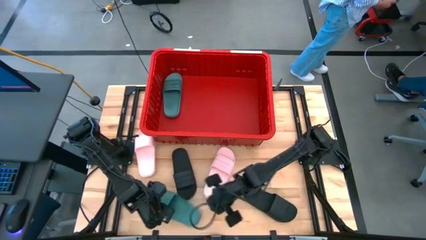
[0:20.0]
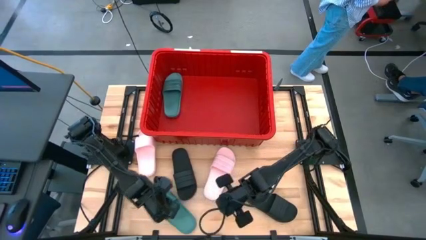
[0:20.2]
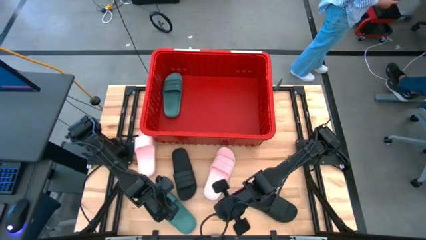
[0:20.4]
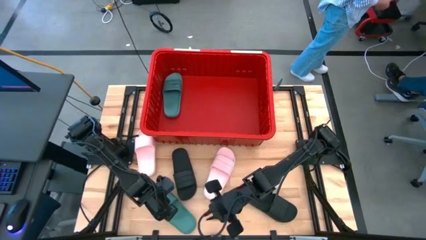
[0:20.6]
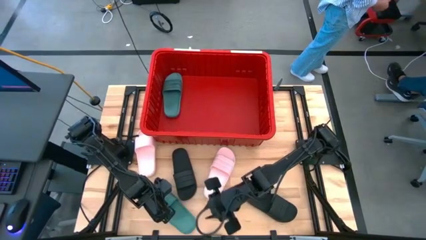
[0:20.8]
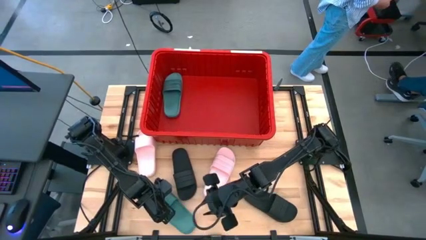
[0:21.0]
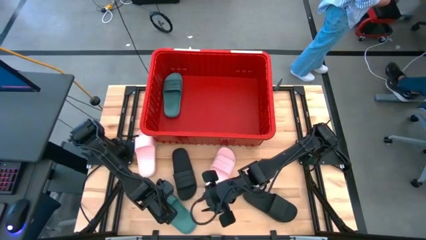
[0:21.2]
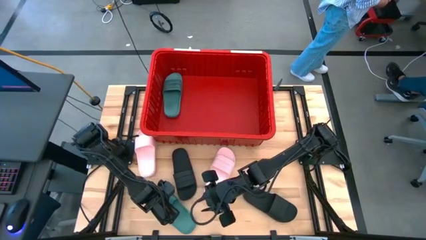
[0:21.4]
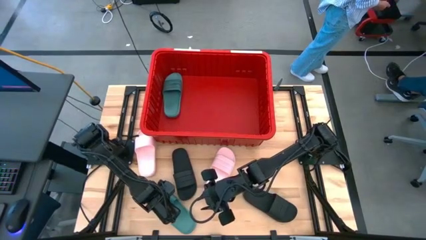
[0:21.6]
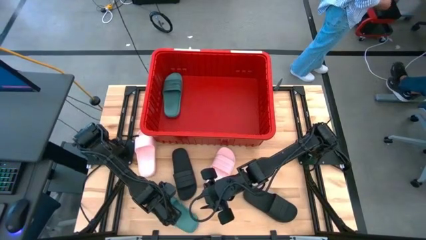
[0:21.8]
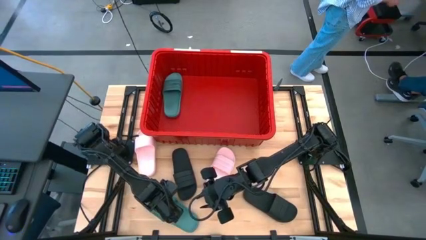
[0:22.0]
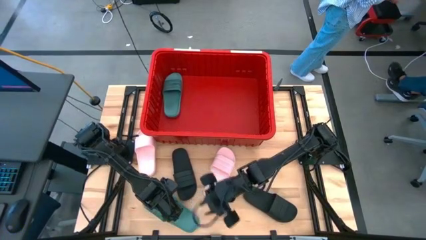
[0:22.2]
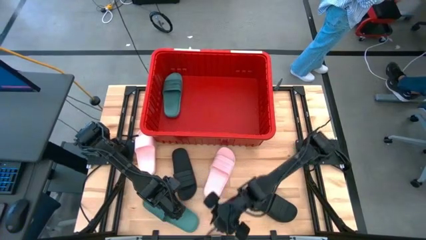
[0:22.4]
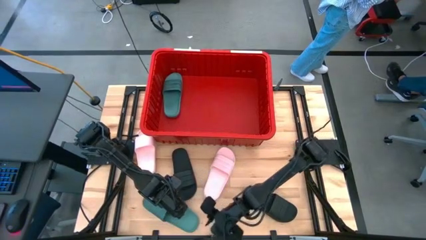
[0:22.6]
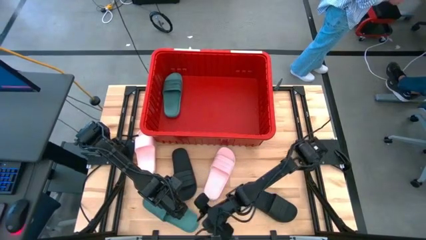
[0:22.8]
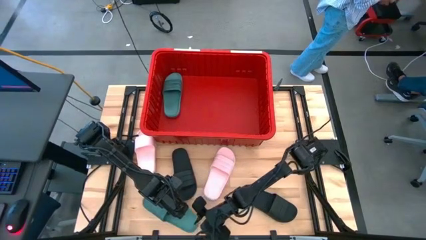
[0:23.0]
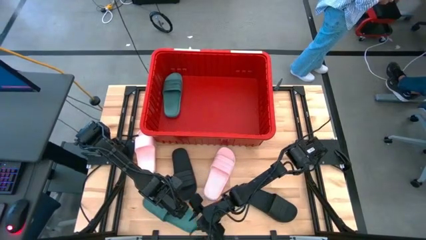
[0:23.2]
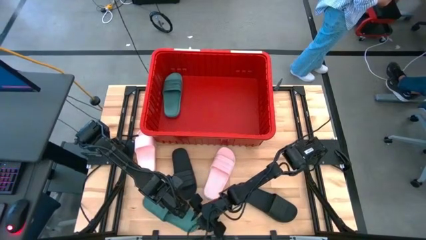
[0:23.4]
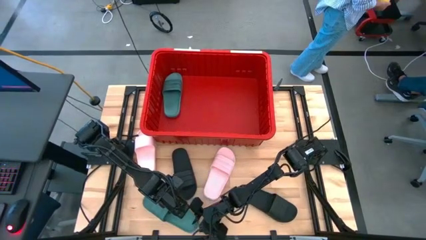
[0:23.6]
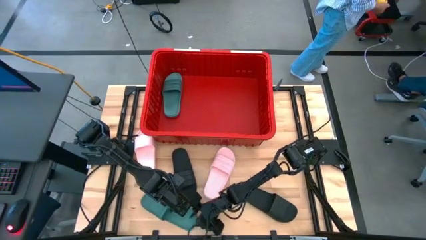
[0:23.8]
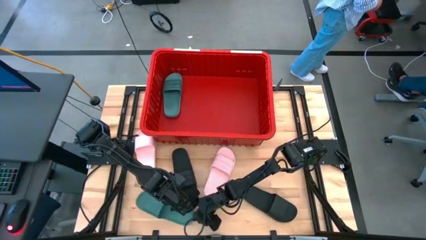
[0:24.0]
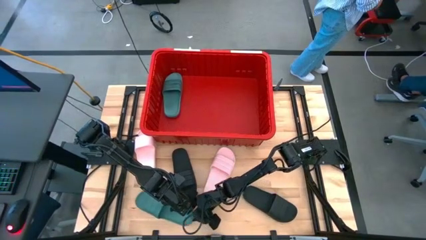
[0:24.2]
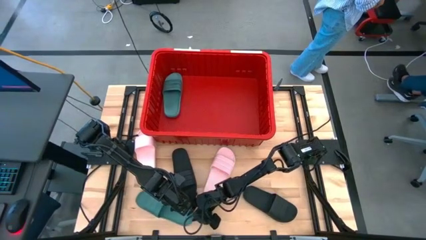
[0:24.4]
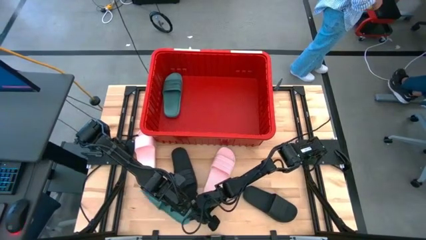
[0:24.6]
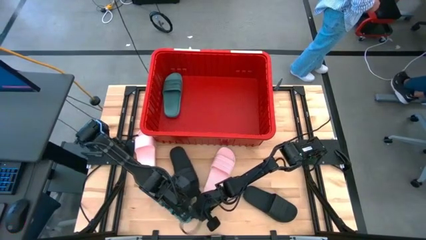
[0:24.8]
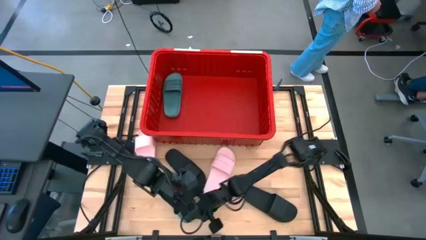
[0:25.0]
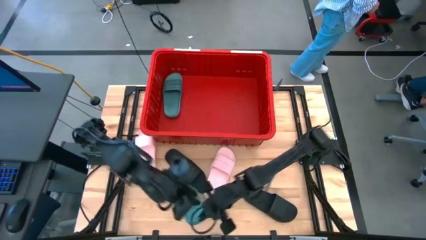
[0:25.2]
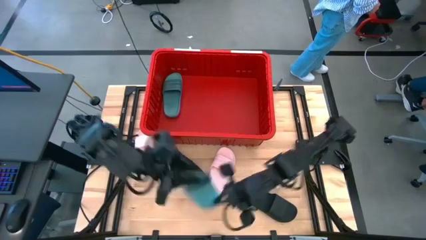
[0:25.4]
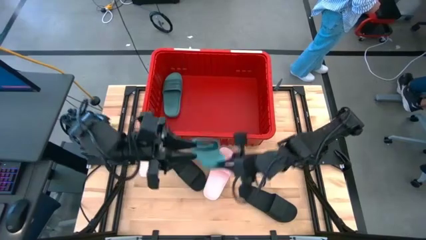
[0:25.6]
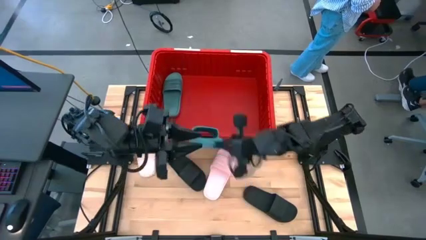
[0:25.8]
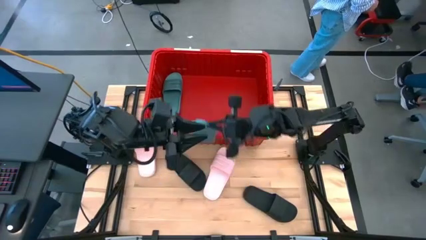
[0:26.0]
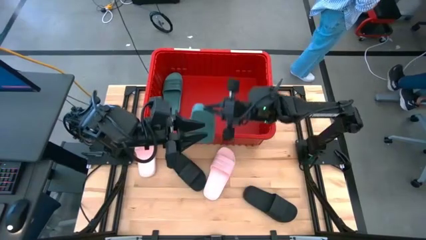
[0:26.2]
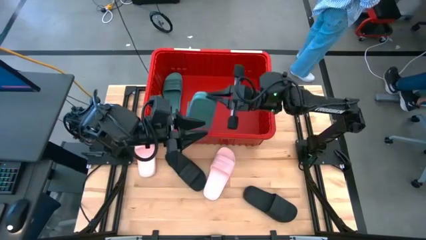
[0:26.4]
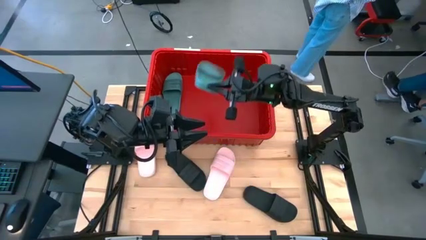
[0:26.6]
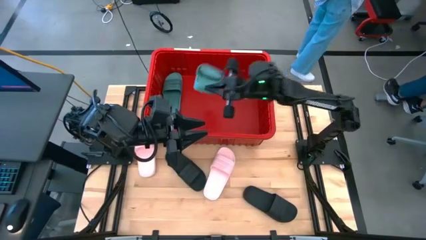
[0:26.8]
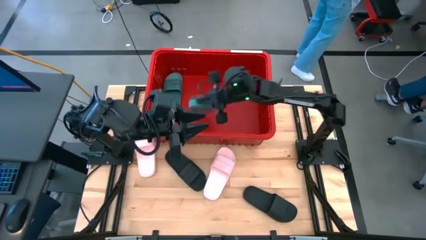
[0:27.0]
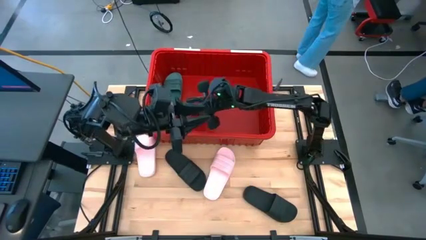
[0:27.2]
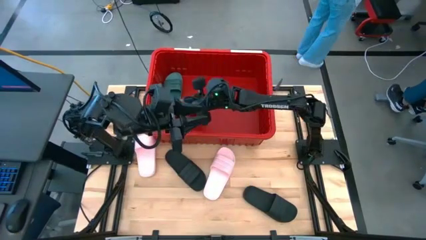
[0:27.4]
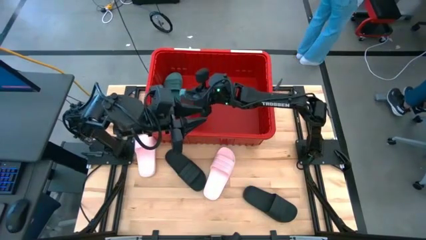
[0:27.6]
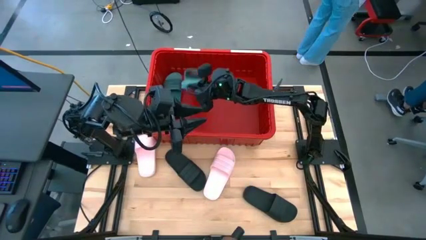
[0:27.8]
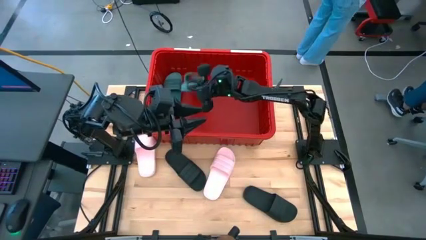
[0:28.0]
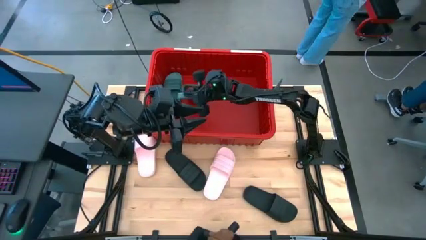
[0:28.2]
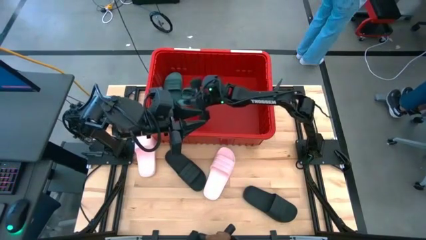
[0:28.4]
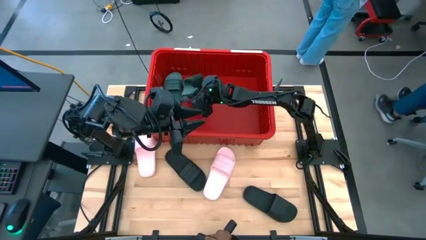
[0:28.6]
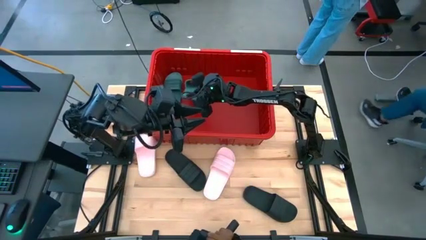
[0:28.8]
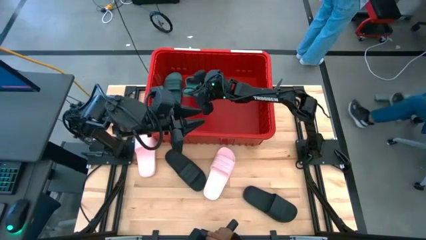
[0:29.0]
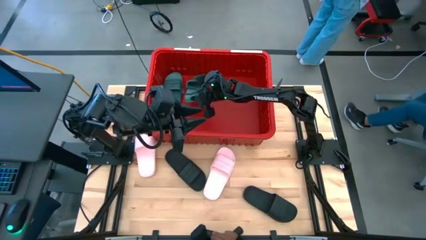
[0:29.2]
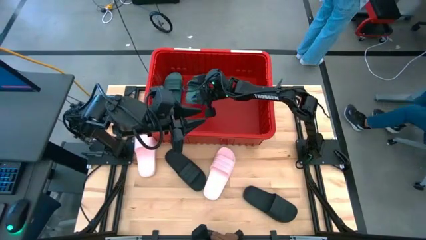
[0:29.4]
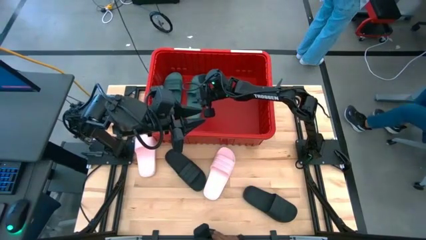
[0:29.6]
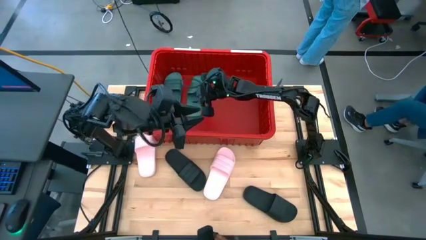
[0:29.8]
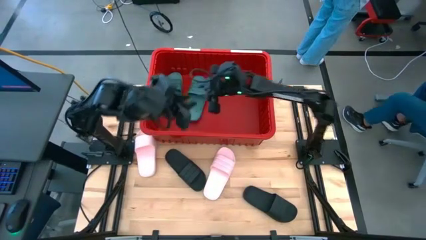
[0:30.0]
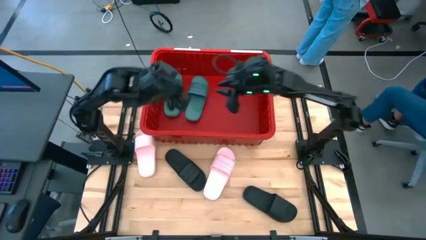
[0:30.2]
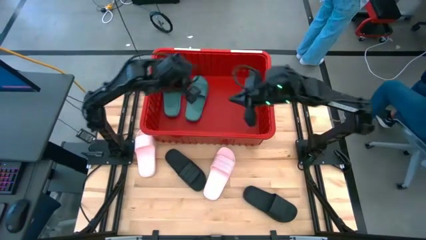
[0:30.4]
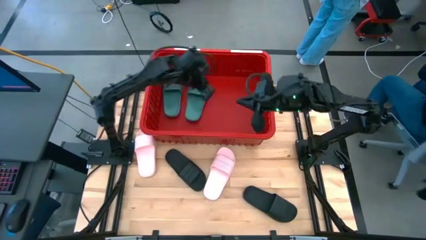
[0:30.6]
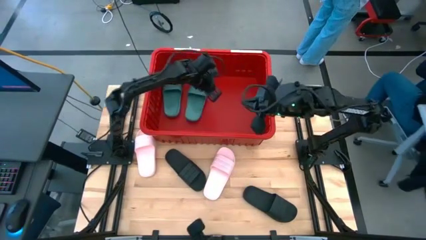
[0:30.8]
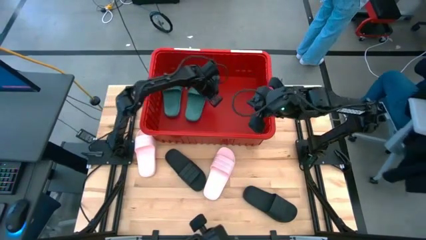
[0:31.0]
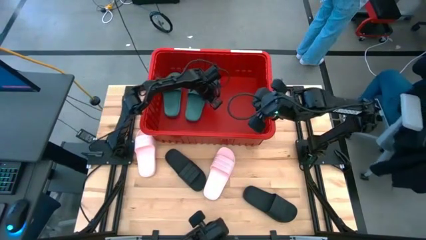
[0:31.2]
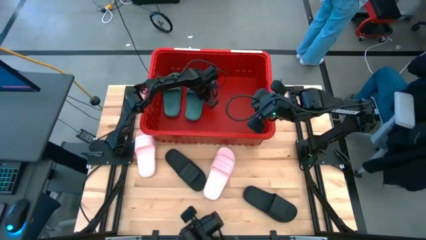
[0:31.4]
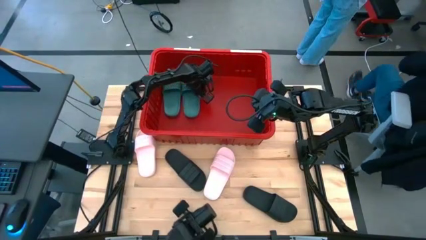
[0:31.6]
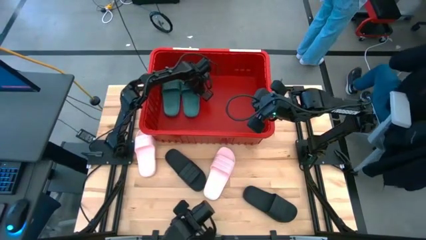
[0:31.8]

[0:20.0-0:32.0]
Task: Pick and place slides into bin
Put the green slipper into the red bin

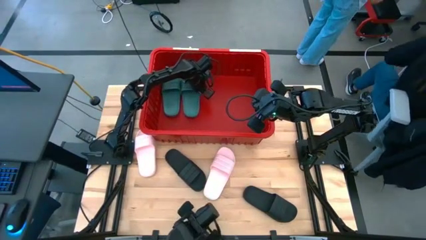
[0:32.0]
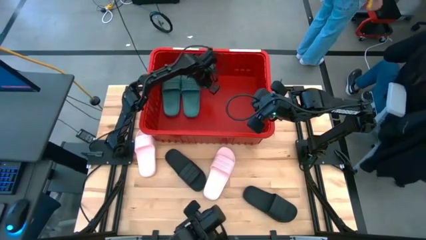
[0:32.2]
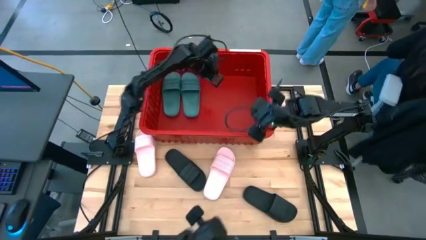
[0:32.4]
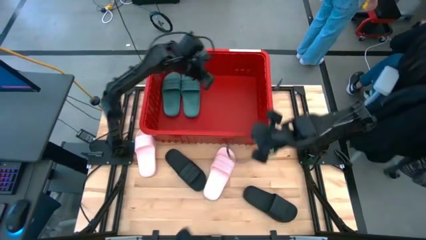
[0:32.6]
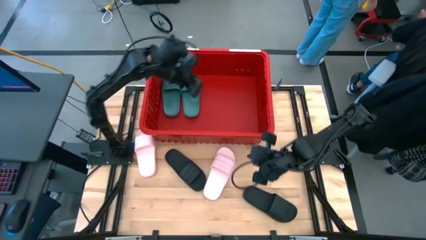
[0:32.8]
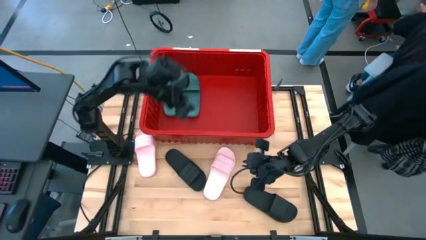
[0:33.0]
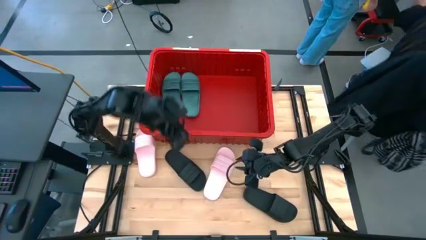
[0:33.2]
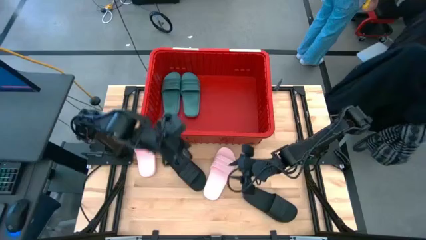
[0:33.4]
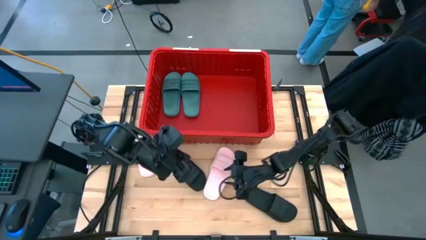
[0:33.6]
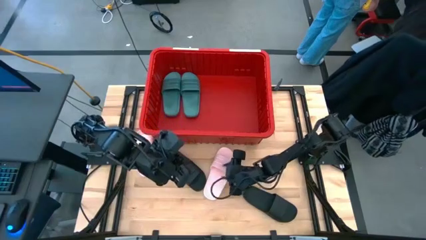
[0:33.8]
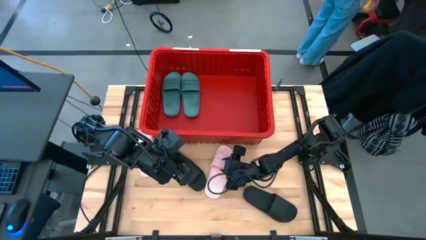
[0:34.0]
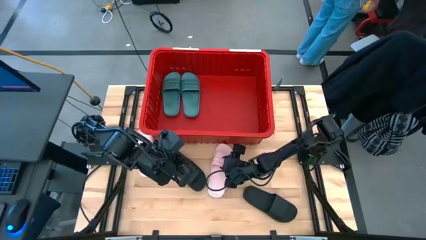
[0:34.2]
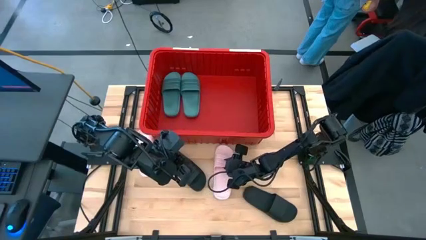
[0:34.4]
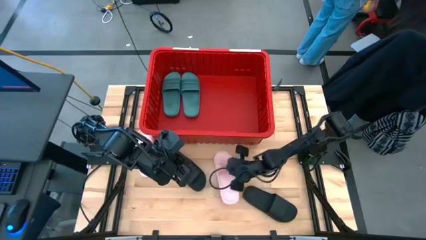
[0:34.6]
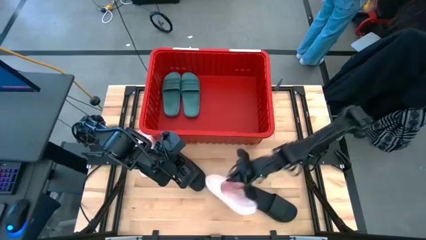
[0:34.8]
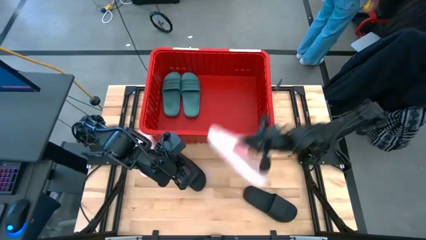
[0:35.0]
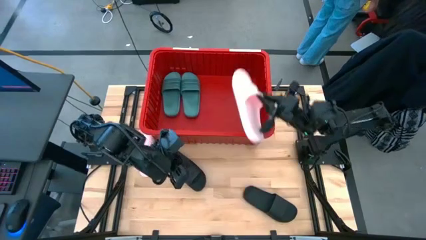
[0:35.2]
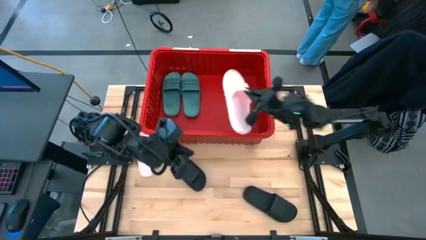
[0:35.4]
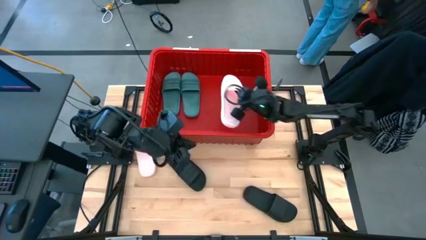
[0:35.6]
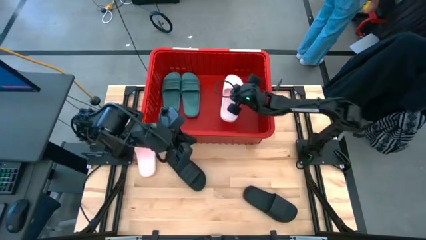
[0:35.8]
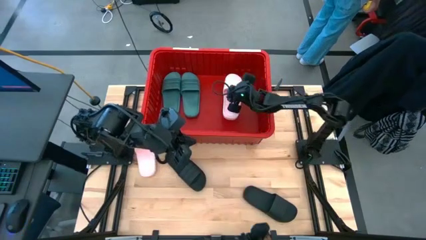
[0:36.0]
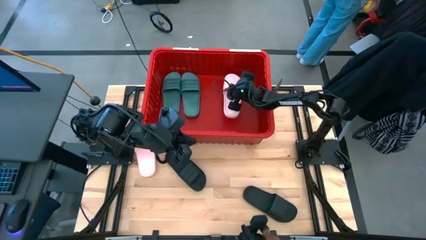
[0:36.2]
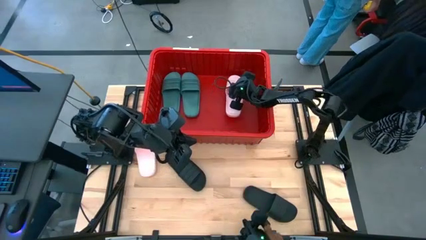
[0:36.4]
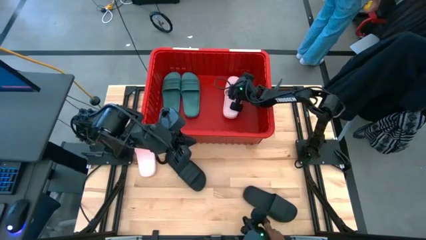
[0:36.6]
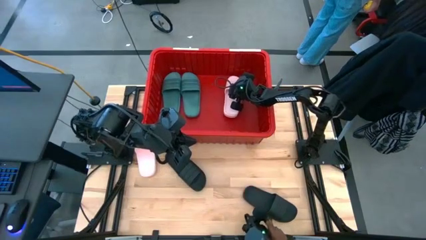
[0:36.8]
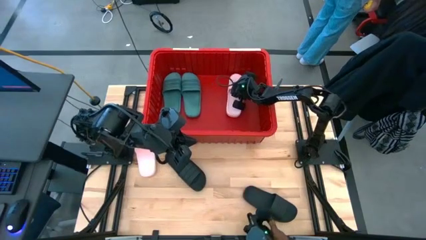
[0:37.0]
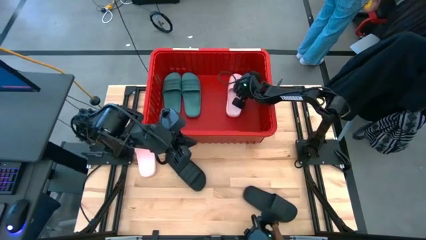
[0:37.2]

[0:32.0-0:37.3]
Put the right pink slipper into the red bin
